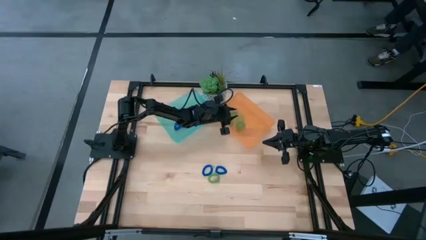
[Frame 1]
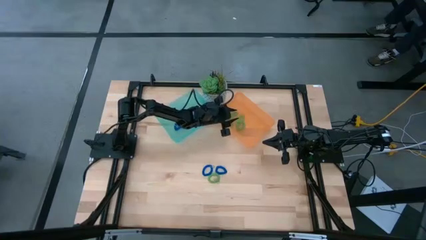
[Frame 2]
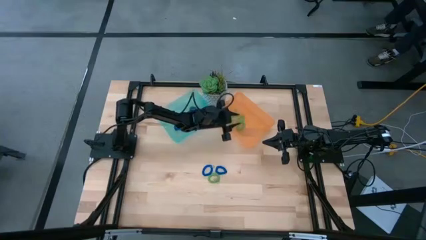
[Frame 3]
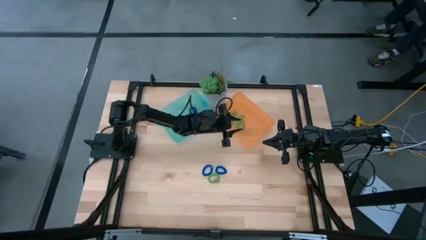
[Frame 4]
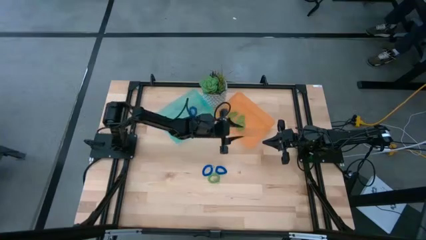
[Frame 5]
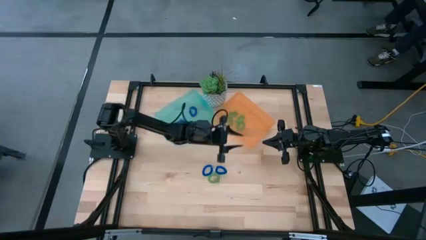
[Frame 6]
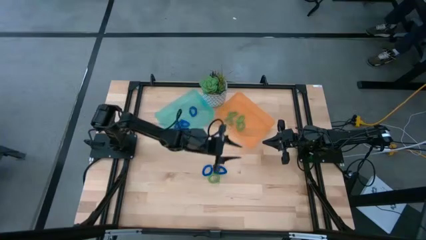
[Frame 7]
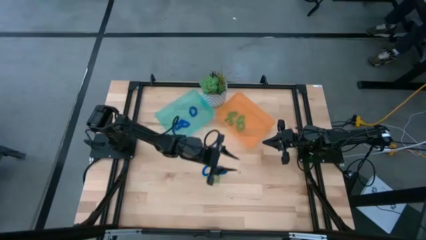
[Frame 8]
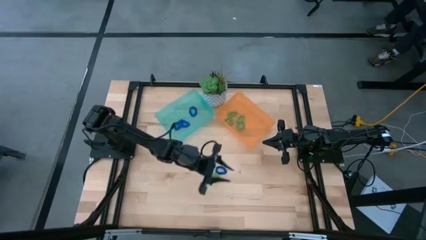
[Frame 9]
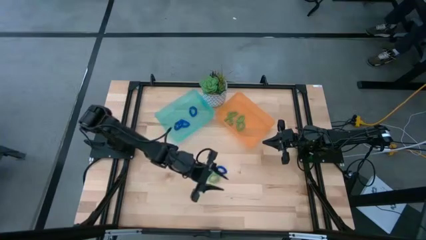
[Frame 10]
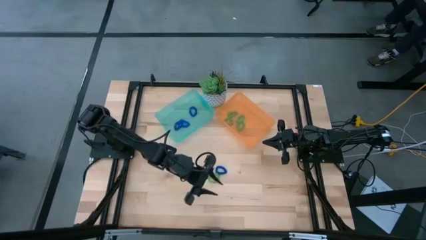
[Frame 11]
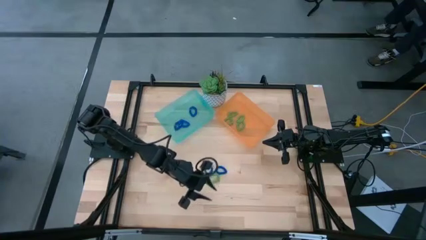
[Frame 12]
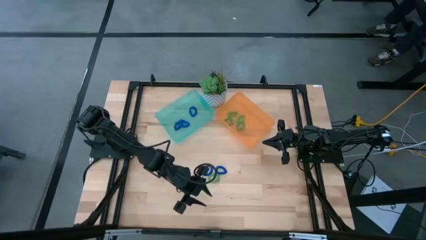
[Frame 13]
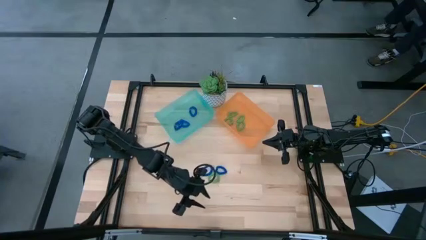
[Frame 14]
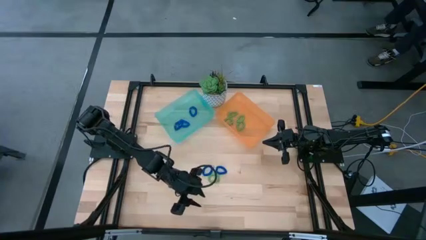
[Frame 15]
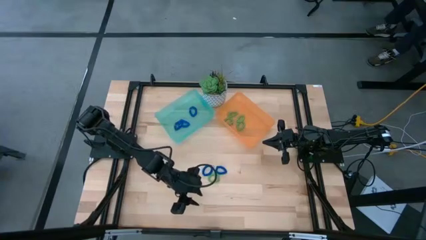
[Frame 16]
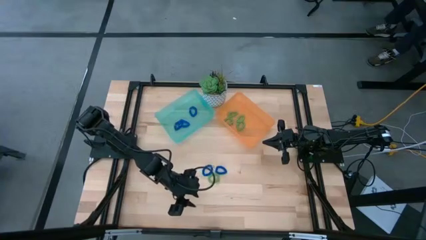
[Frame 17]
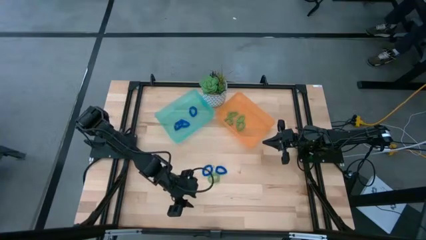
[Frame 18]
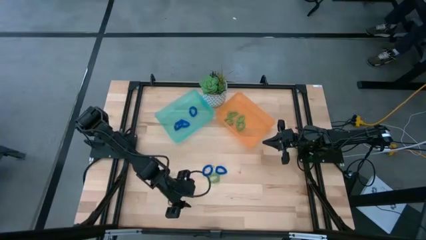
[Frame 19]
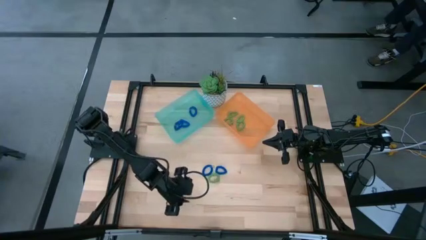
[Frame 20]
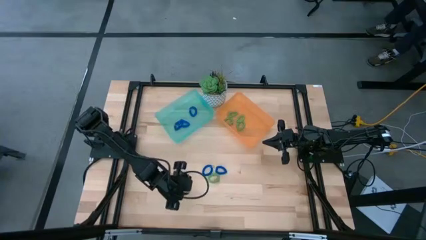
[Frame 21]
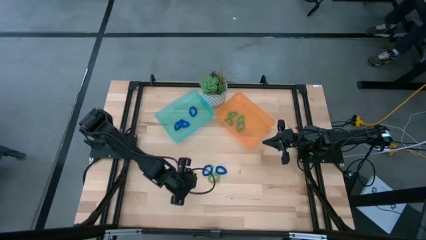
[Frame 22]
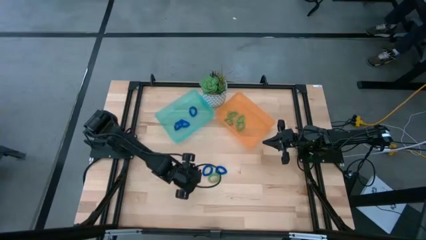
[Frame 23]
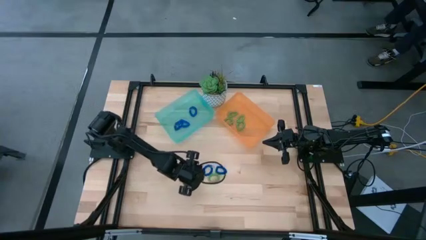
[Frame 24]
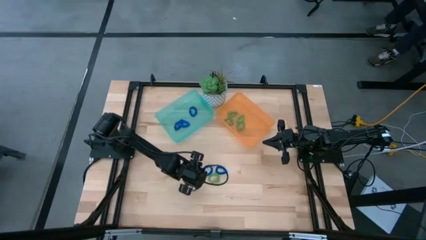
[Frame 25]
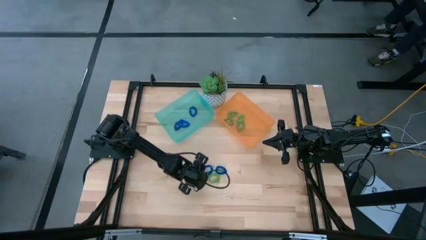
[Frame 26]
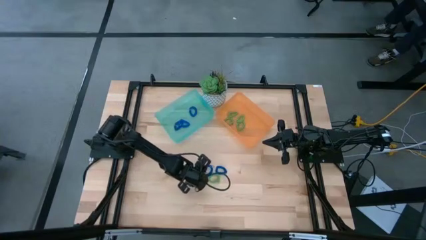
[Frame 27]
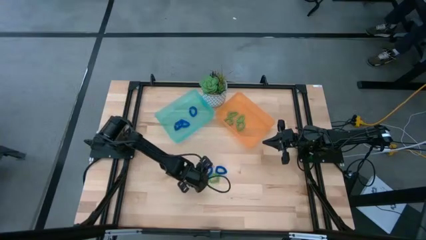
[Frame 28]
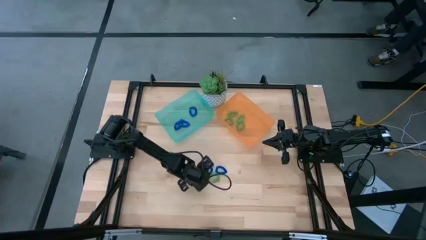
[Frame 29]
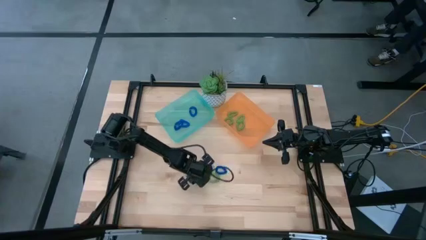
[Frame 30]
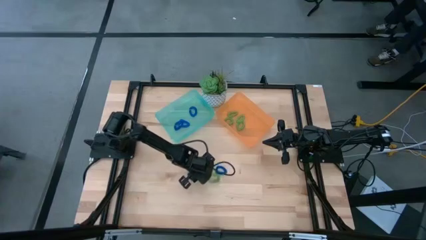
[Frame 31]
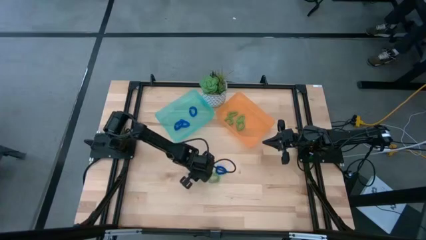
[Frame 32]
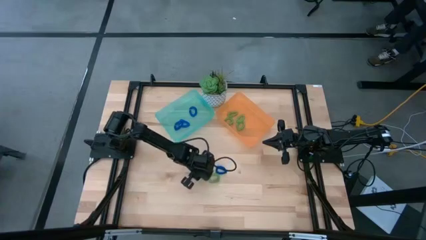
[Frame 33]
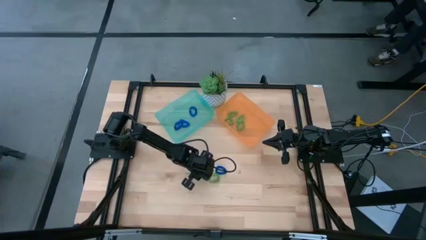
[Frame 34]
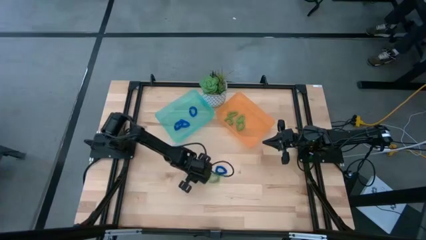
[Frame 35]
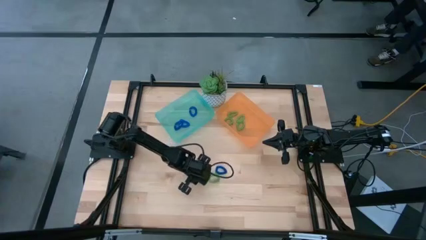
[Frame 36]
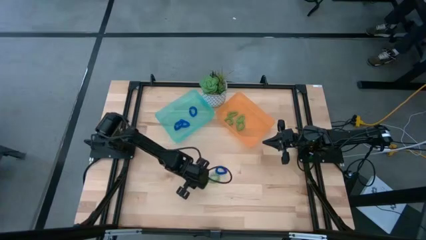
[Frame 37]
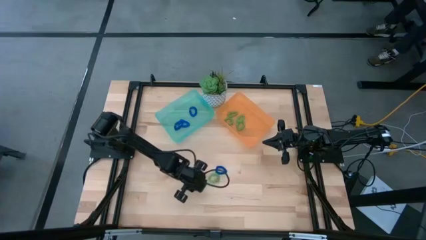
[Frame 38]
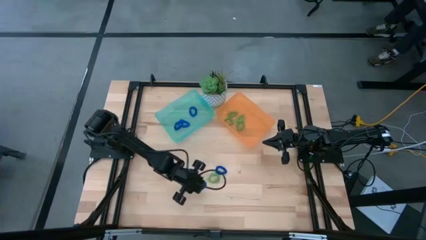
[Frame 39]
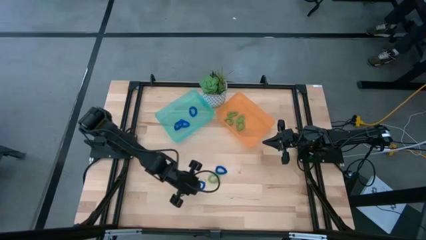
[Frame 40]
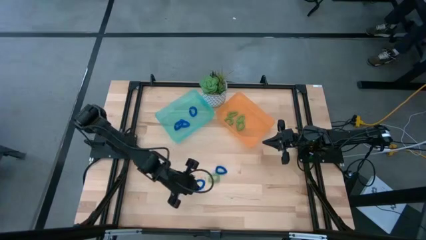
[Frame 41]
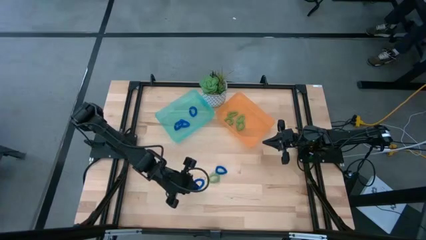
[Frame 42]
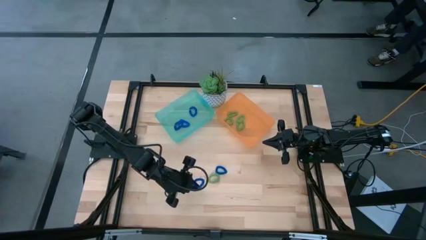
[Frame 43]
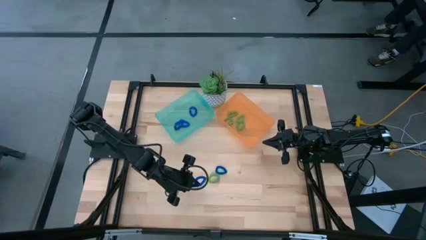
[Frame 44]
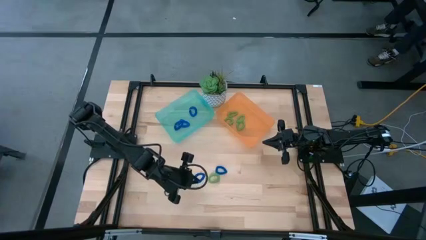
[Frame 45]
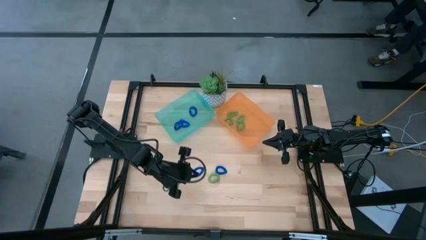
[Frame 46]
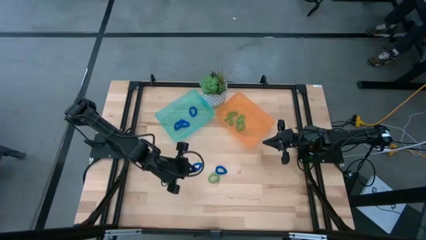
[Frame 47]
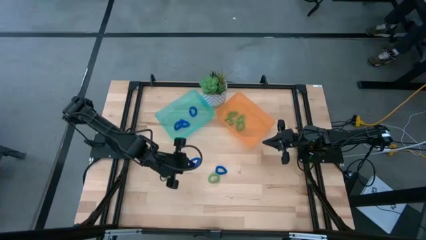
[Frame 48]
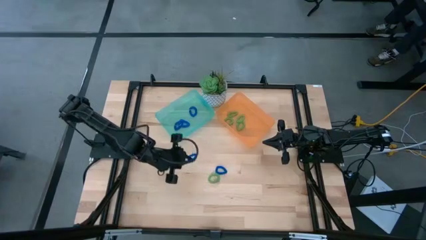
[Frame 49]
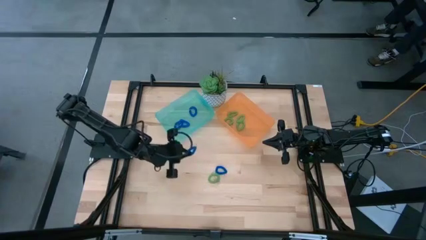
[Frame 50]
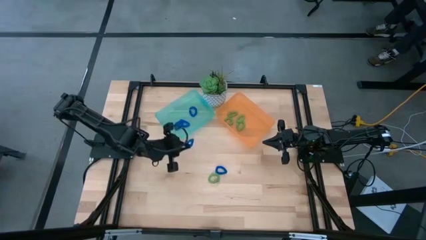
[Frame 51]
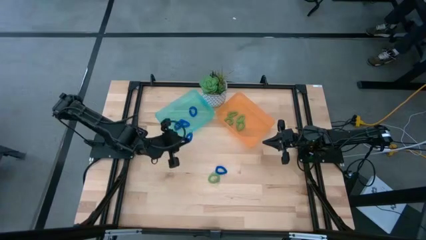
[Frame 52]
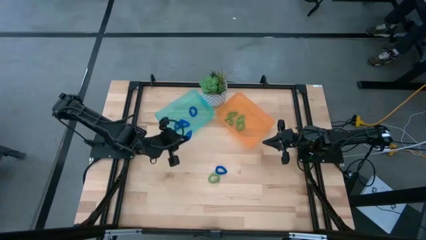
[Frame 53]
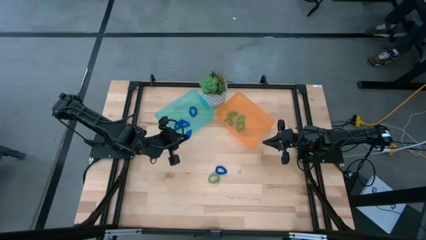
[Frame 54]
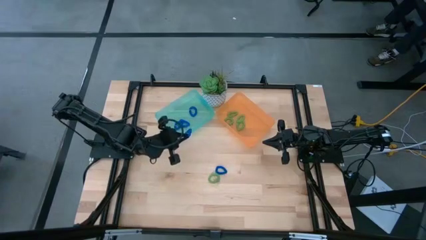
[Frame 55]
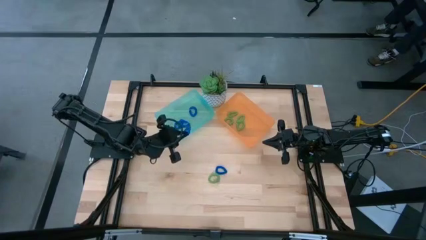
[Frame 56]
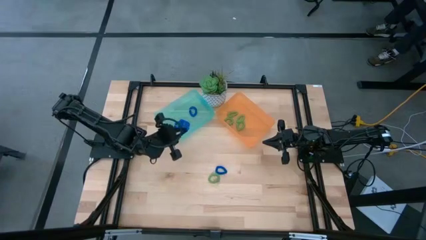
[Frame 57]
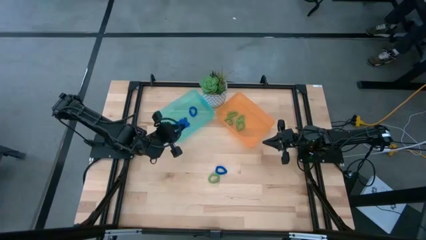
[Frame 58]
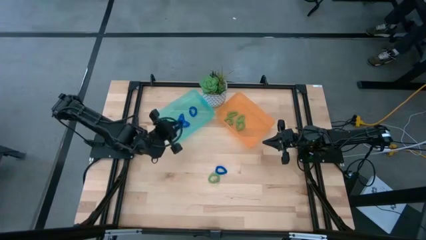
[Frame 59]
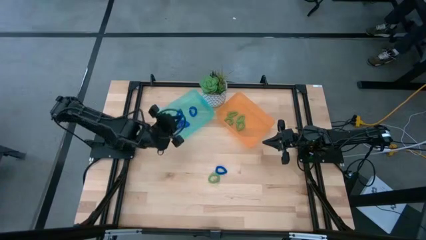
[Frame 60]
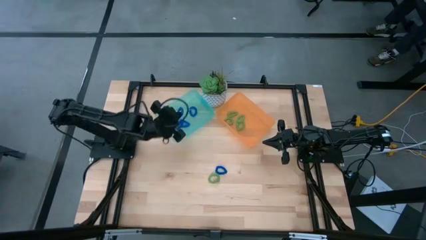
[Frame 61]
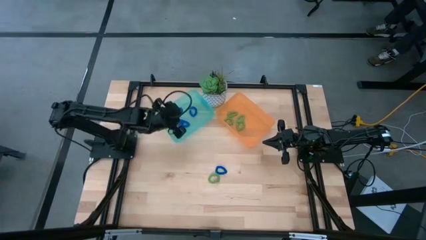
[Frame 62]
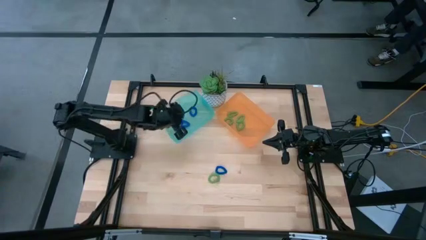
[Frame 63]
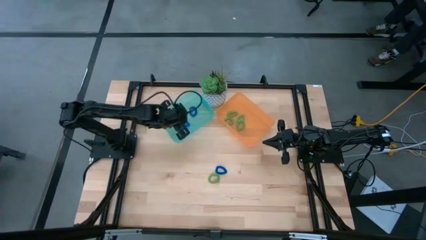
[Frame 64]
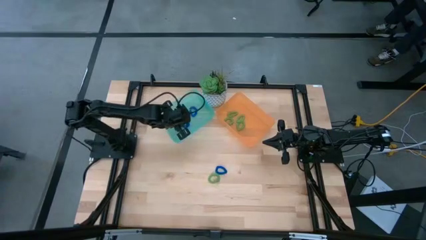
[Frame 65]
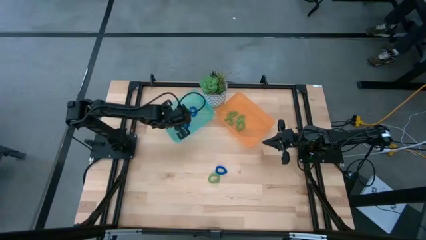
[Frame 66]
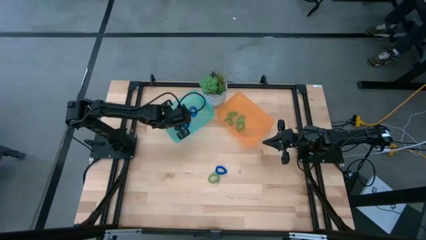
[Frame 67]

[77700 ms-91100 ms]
Task: Sort spring keychains
Put the blue spring keychain into the green bin

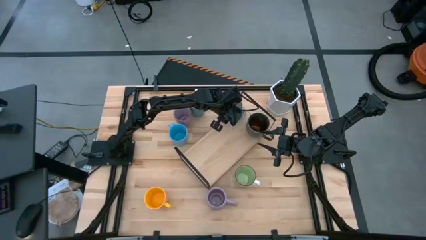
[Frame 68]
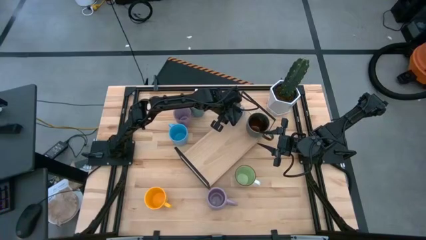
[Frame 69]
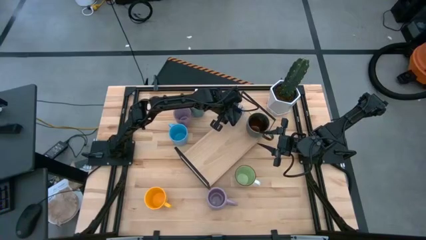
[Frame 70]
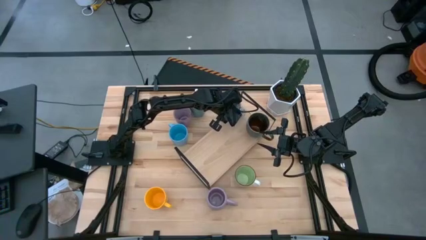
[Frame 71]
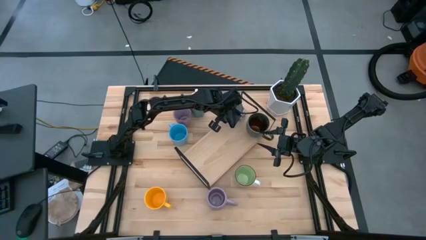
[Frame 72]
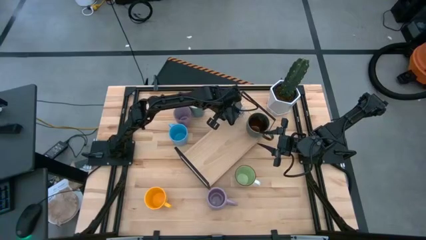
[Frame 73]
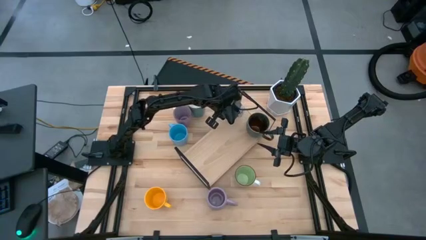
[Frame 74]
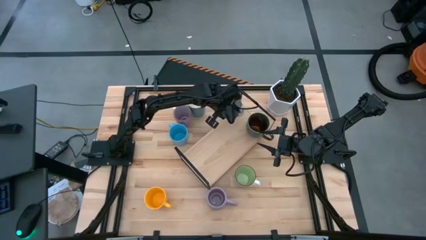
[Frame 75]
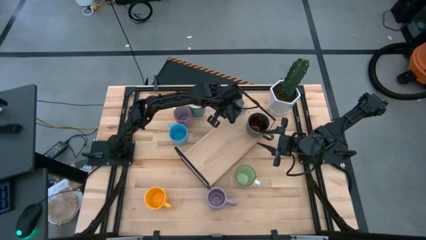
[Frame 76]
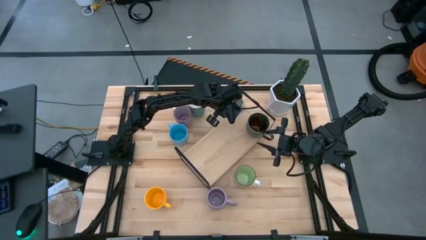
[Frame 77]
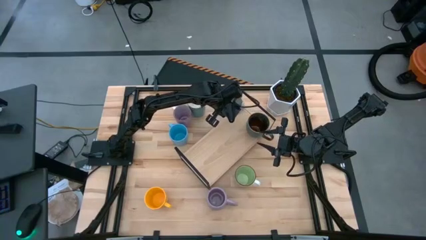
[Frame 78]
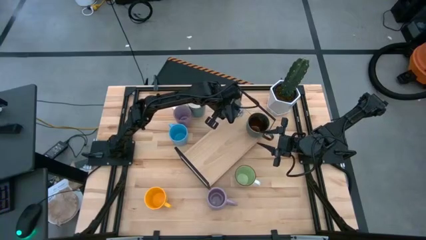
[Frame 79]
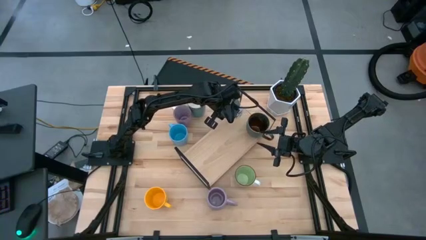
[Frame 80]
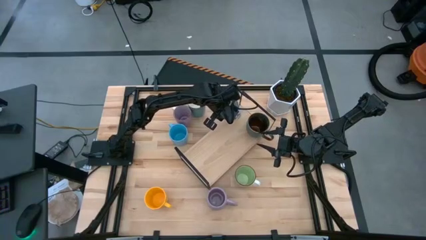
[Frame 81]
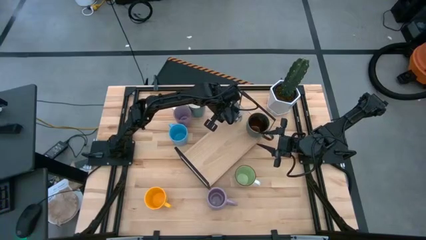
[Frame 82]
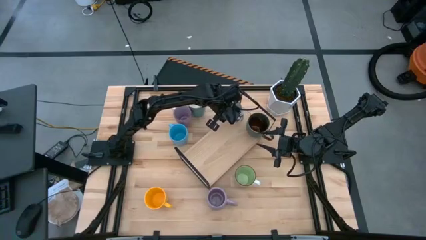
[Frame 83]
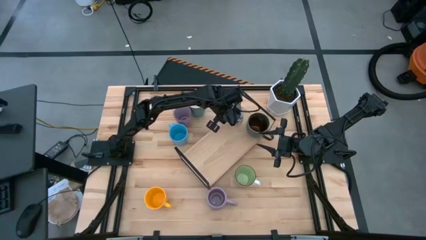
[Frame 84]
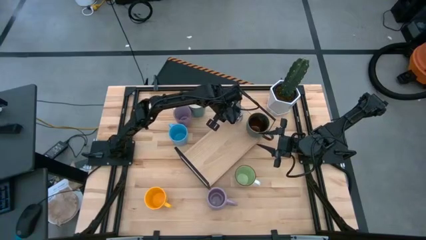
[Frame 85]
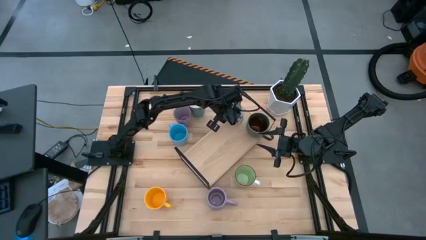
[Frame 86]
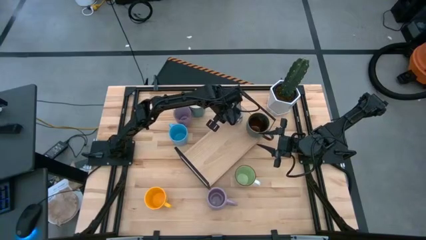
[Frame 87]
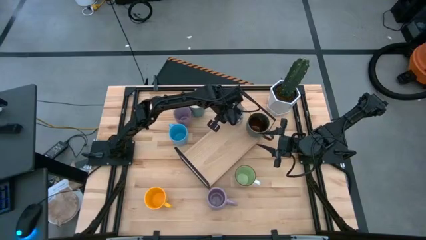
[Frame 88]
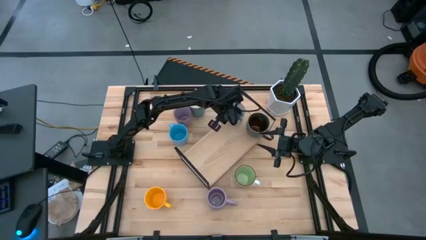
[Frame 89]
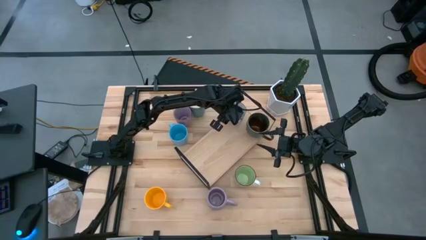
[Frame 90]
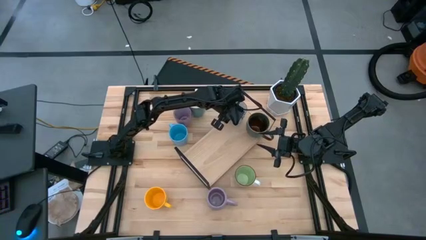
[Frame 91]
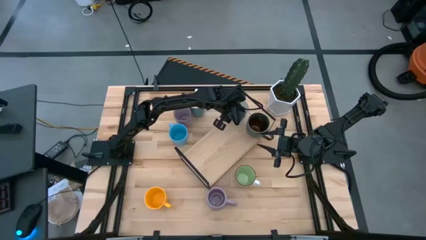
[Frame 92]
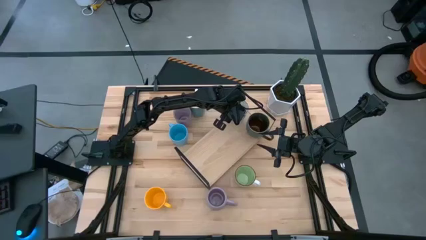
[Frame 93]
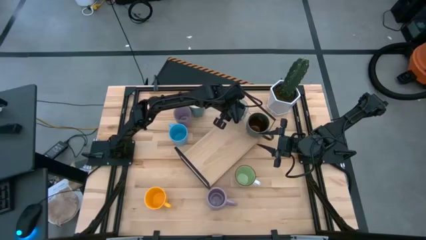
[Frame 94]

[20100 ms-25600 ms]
Task: Place coffee mugs
Put the blue patterned mug on the shelf
